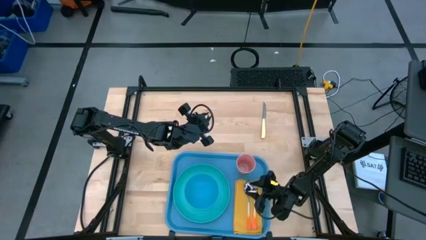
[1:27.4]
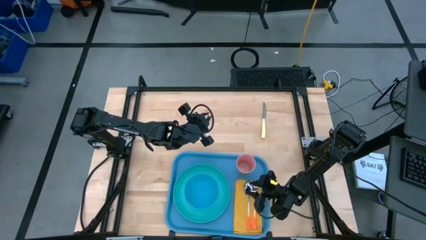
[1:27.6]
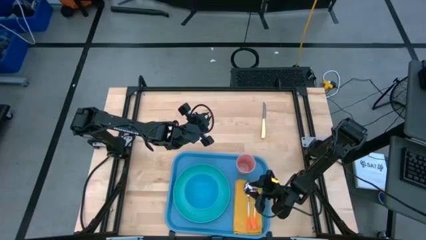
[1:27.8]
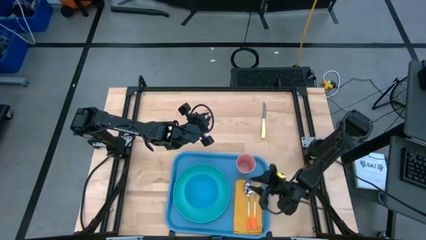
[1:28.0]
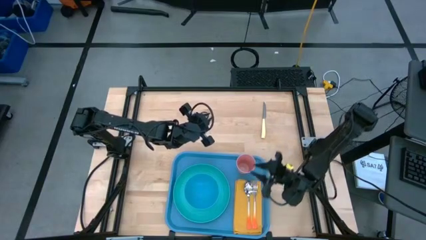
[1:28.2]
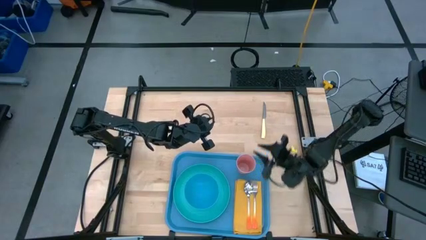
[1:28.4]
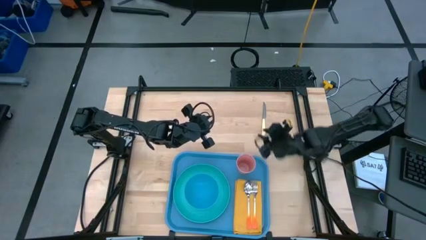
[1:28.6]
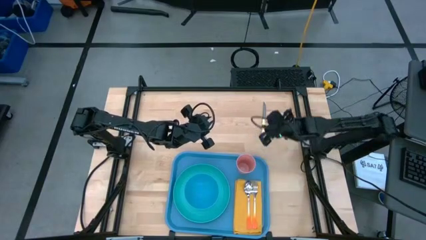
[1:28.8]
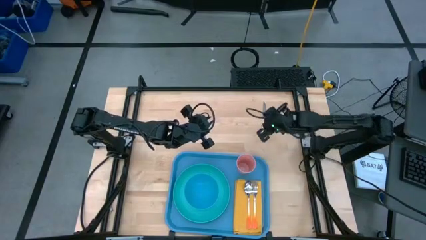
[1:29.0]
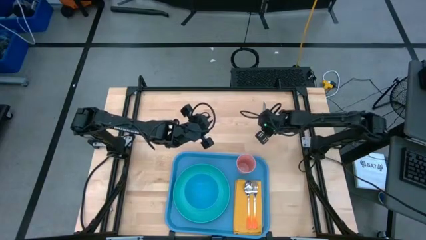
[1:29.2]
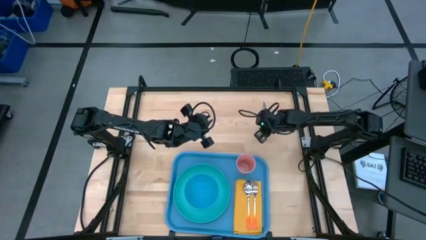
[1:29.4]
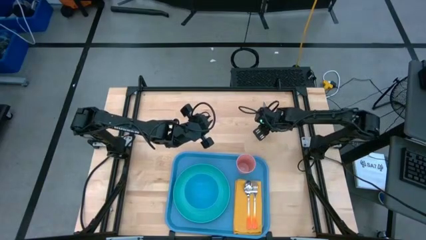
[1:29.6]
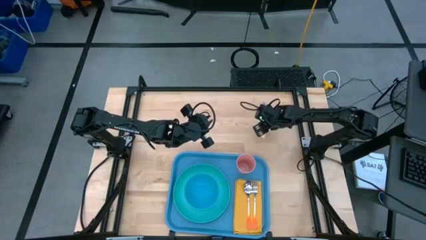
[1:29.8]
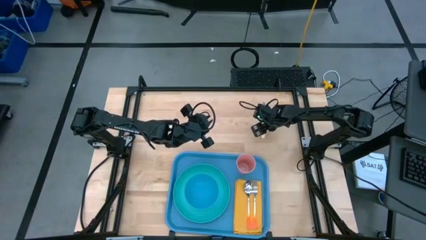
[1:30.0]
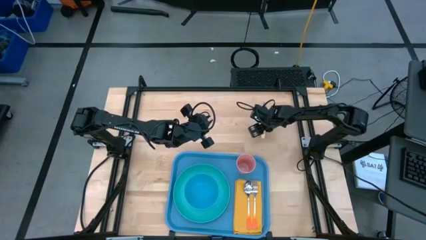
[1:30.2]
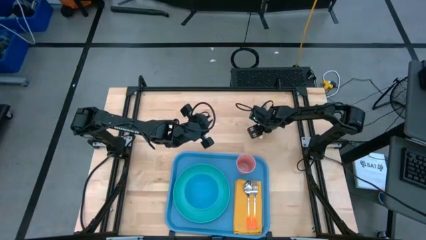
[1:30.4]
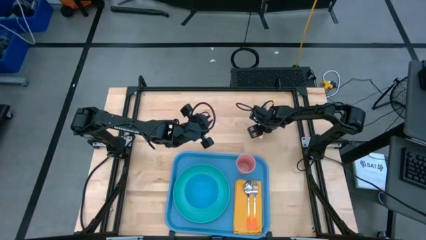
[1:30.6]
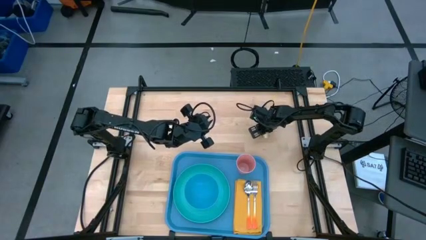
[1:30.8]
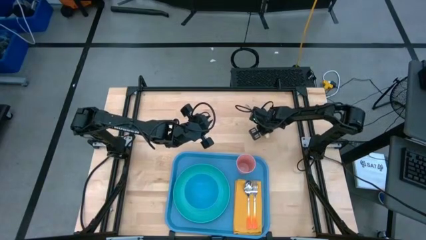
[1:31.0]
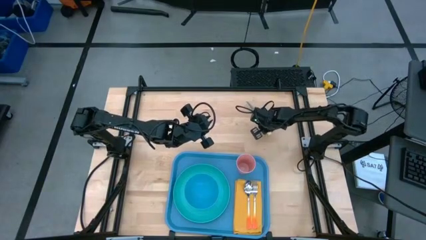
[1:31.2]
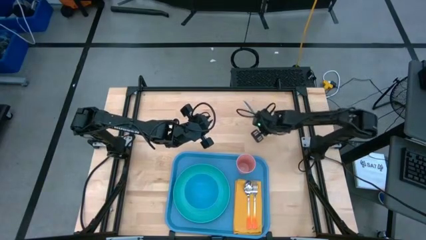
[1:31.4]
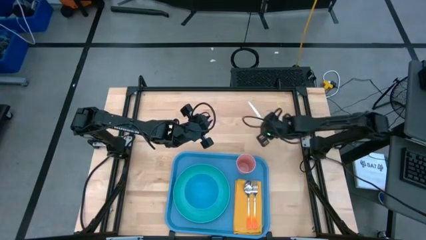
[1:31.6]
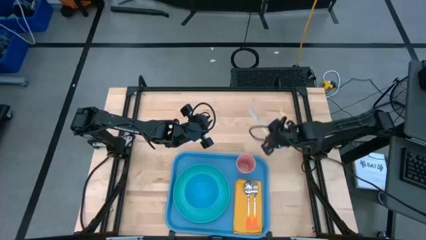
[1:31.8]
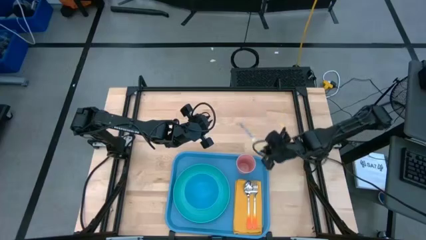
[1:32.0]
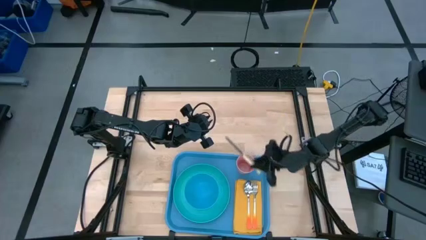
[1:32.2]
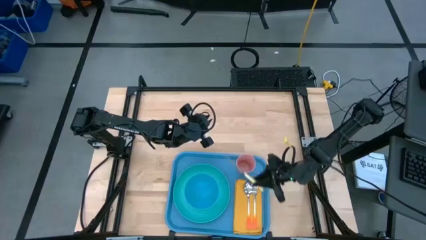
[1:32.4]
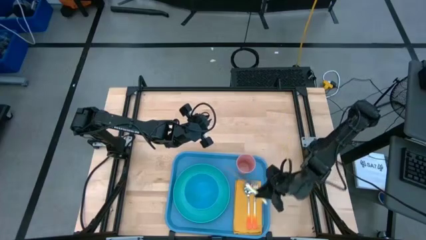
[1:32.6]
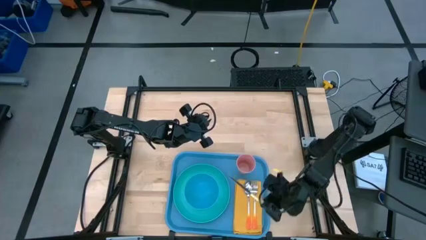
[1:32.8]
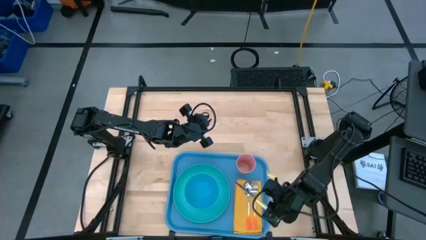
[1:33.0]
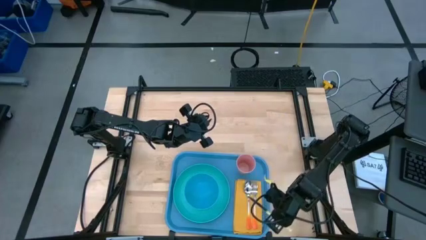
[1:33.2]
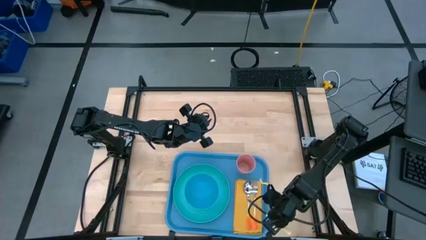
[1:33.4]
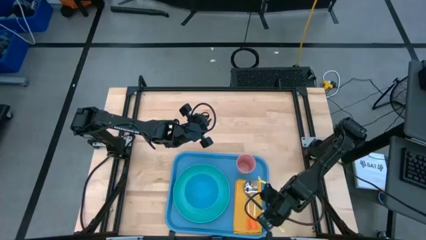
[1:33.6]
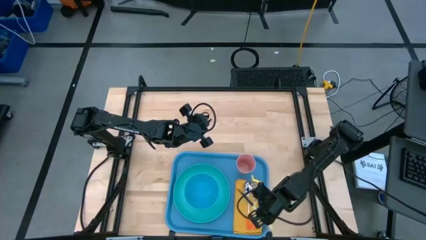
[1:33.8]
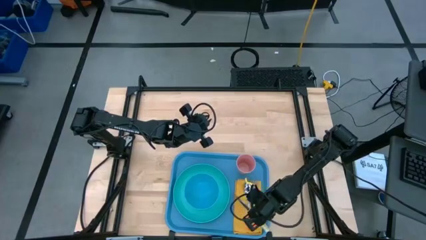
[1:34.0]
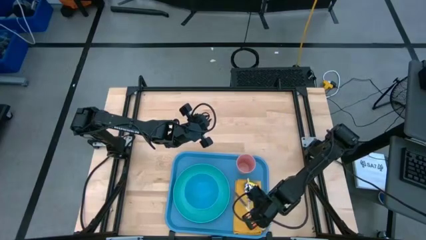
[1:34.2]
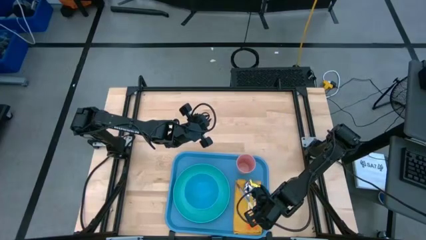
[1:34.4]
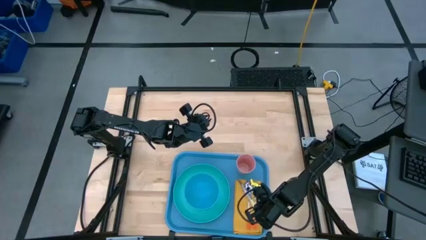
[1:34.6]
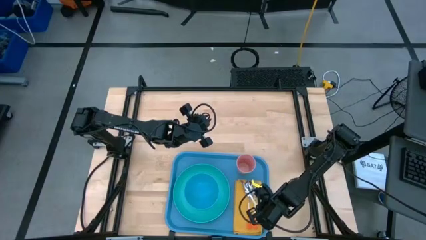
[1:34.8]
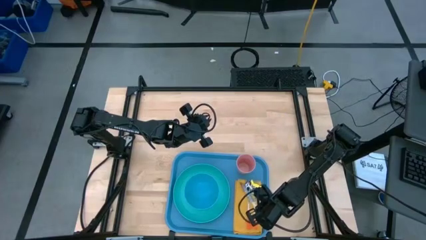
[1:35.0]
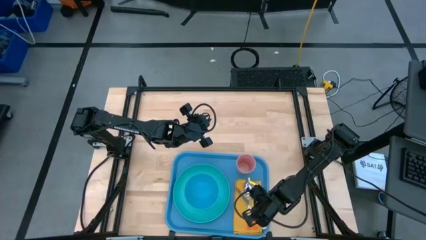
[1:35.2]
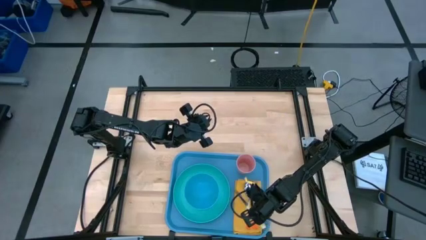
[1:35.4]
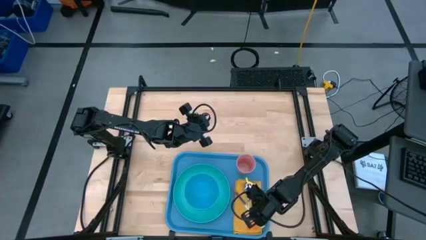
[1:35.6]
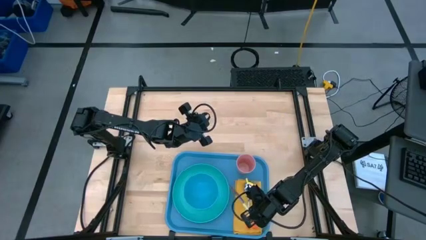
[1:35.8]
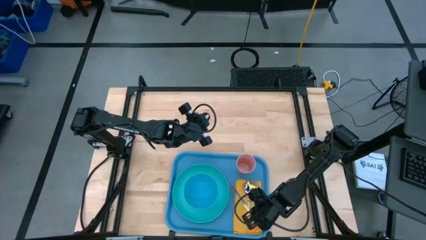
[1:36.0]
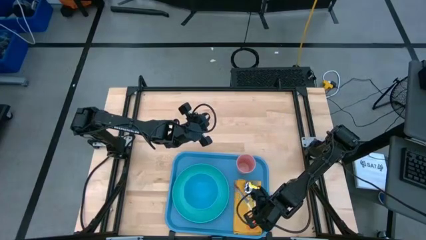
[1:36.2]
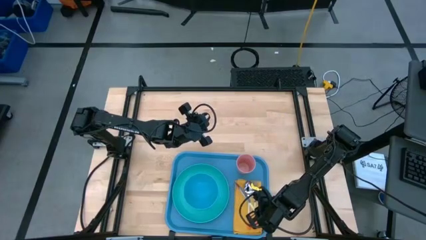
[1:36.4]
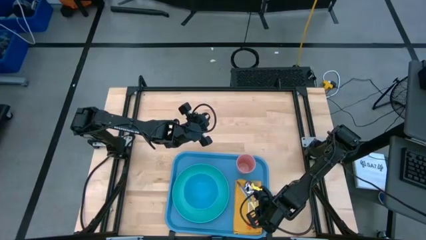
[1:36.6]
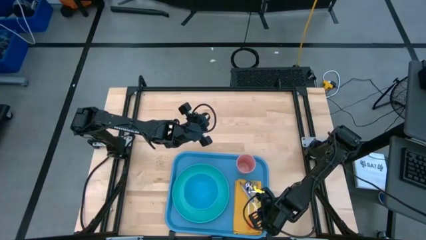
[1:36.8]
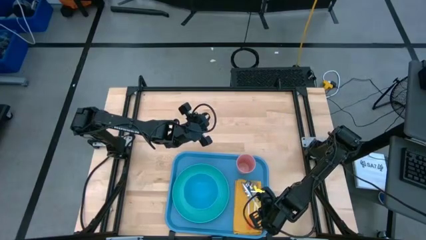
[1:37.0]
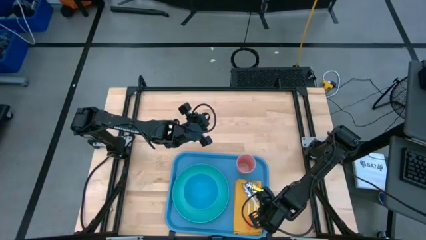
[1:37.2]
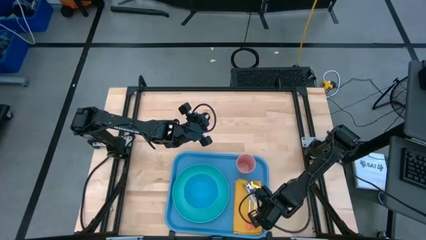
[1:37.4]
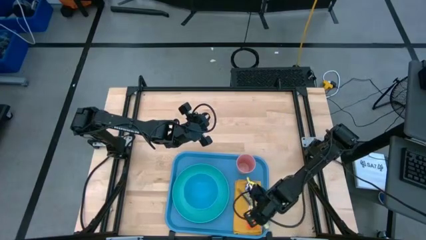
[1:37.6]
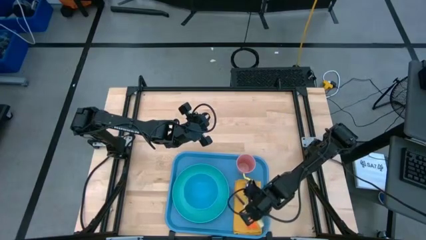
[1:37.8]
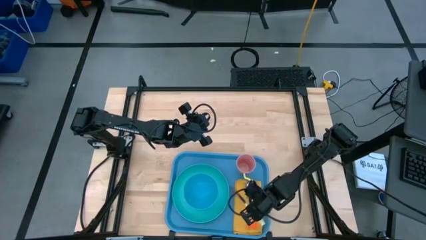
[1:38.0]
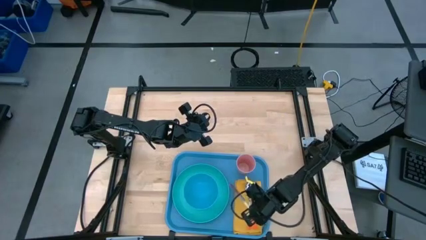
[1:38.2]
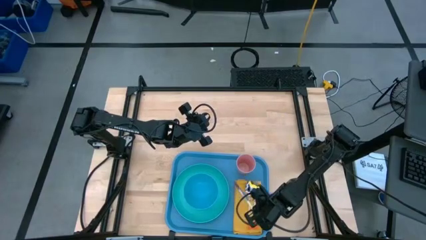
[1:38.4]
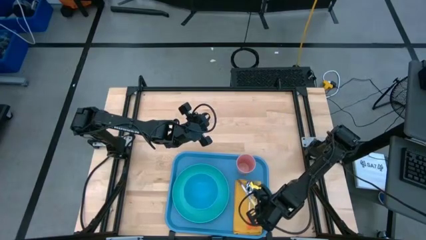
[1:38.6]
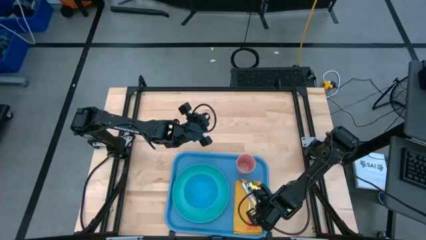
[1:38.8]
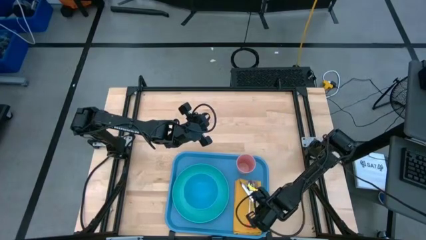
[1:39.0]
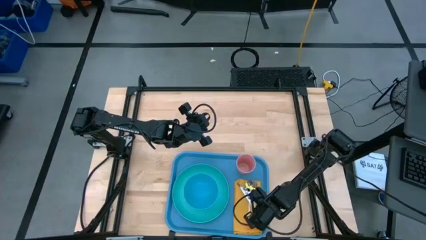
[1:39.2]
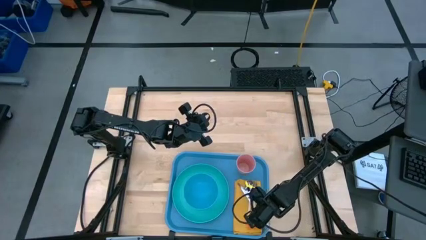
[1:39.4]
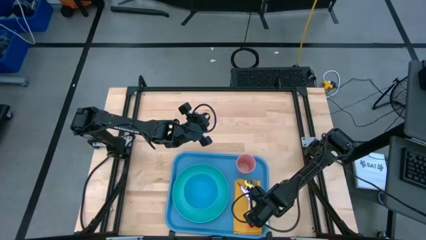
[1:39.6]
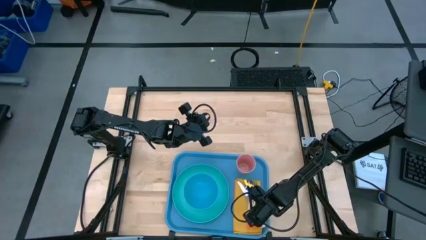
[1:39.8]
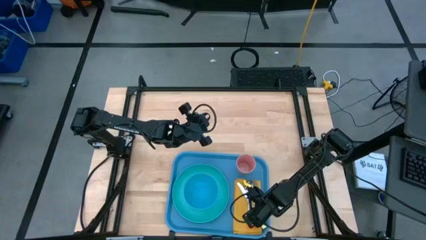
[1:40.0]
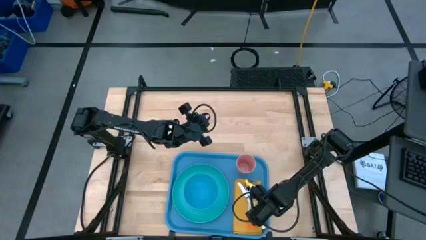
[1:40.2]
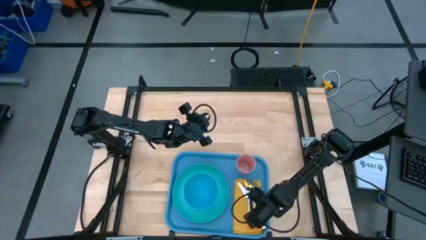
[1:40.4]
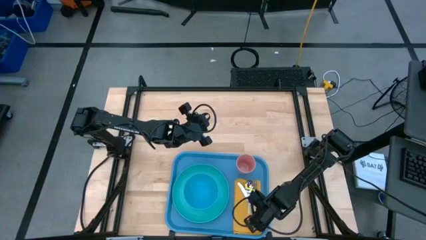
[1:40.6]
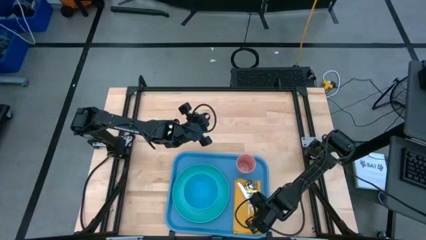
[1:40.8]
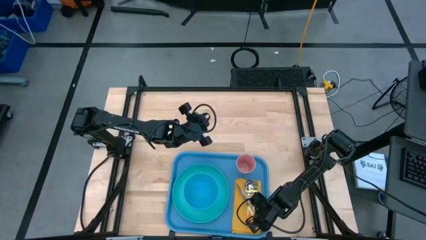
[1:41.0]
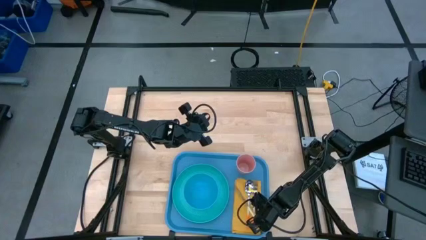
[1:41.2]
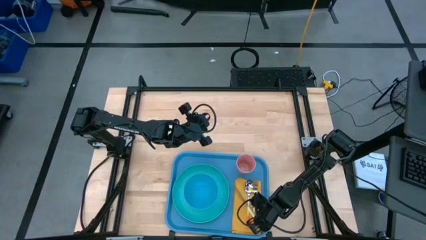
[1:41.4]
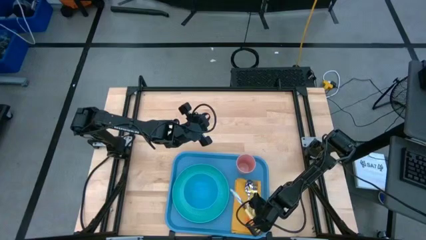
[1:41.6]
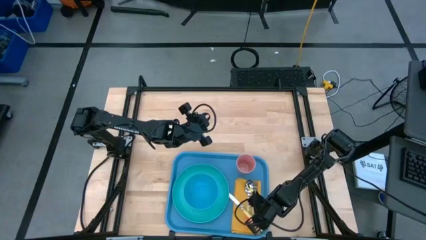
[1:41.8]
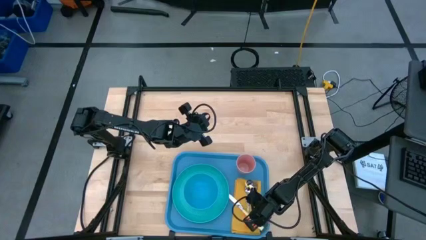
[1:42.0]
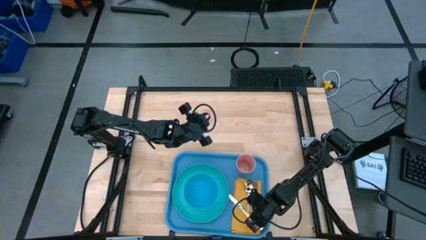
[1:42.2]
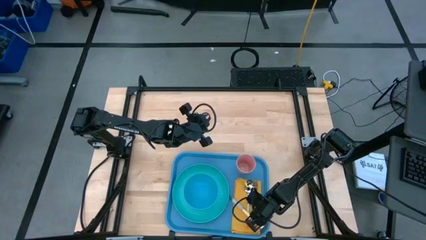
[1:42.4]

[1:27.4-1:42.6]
Task: Set up tray
Put the yellow knife on the yellow napkin to the left of the orange spoon

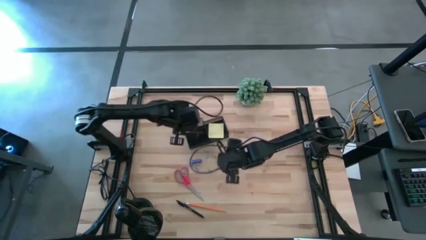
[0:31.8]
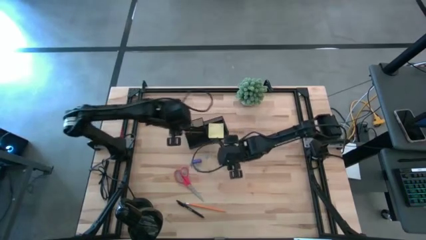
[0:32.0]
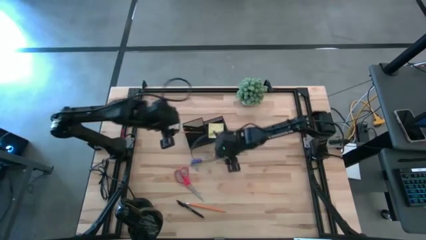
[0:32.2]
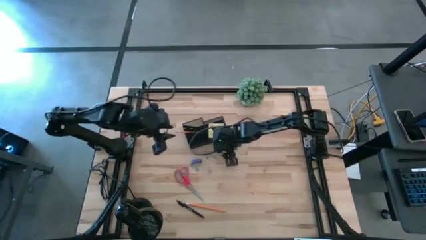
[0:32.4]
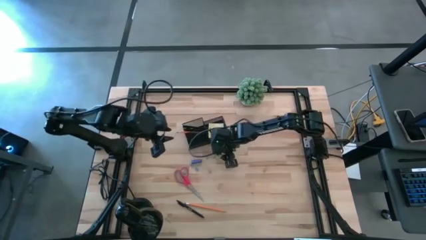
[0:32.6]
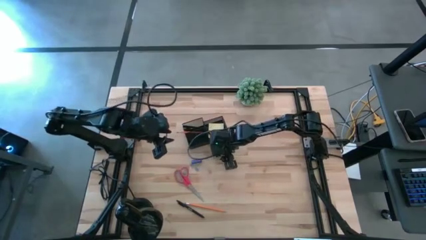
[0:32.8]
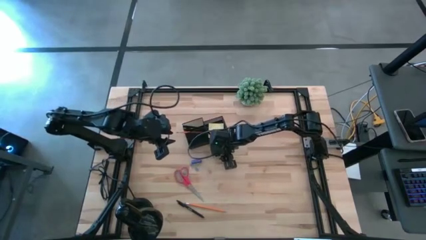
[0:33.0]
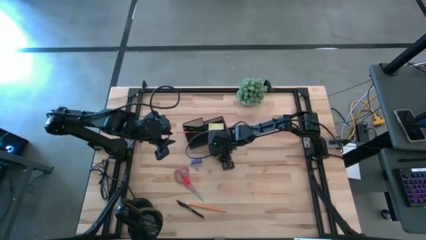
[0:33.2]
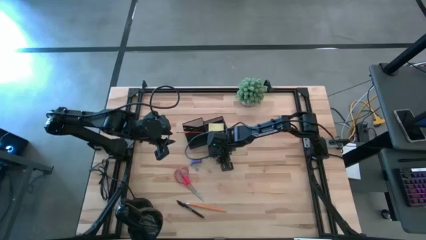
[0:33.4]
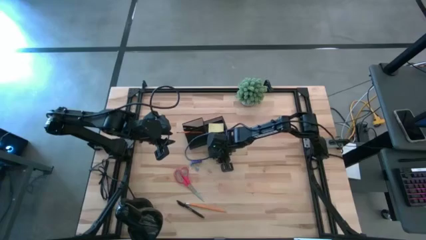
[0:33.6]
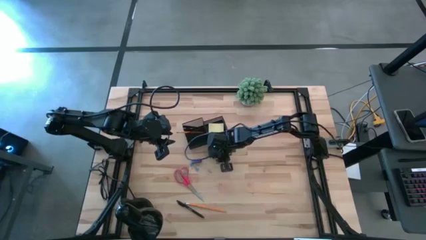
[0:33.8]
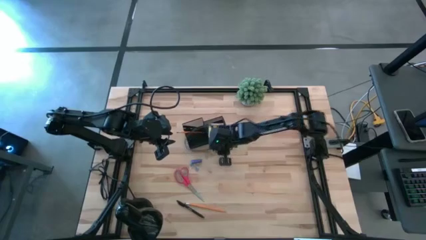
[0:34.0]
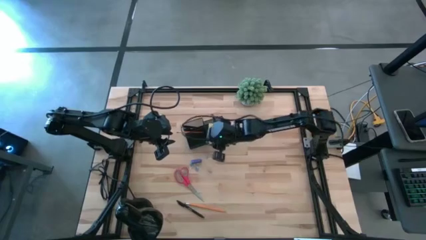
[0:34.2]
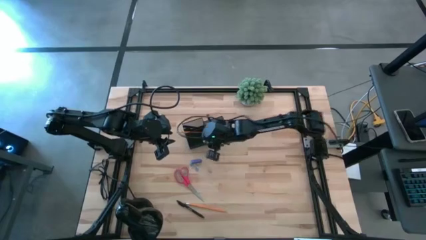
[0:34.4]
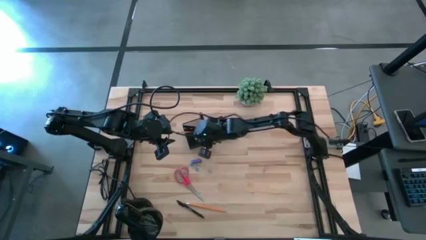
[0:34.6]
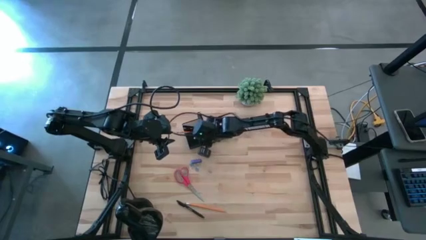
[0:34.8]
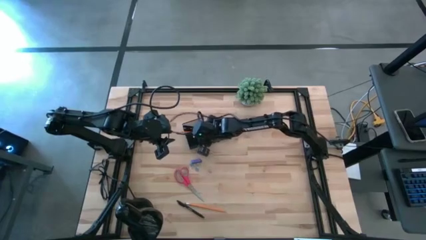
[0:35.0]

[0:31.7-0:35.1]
Task: Pick and place office supplies into organizer
Put the right brown binder clip into the desk organizer
